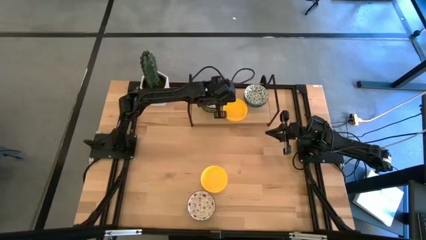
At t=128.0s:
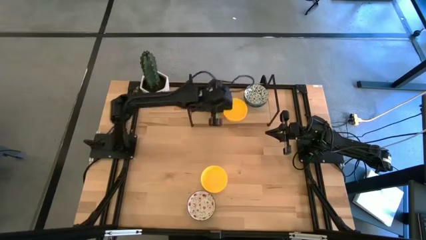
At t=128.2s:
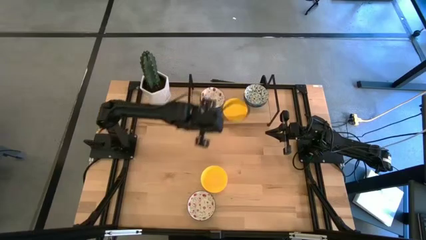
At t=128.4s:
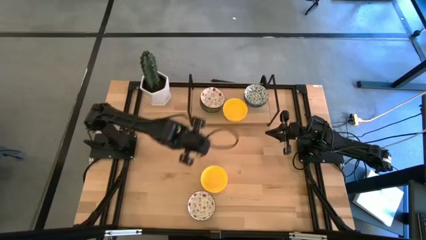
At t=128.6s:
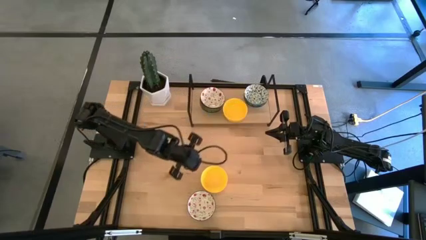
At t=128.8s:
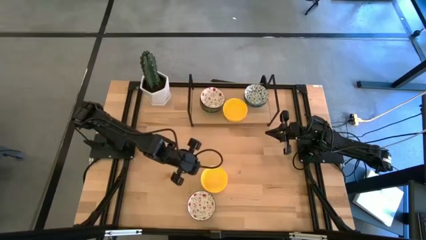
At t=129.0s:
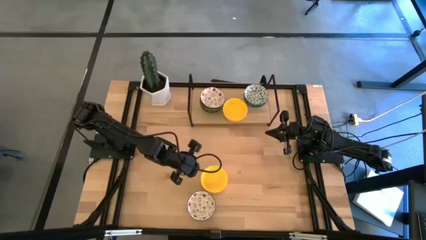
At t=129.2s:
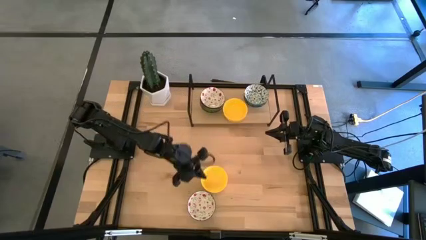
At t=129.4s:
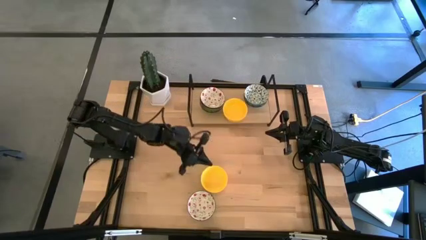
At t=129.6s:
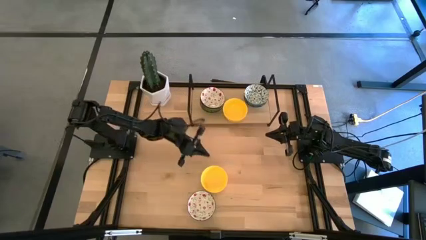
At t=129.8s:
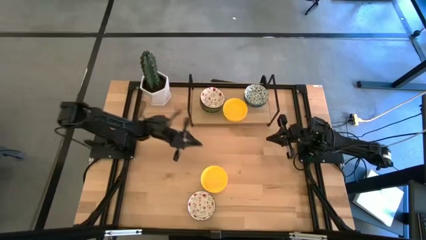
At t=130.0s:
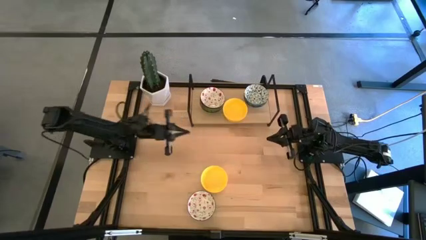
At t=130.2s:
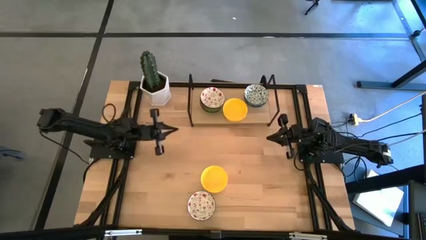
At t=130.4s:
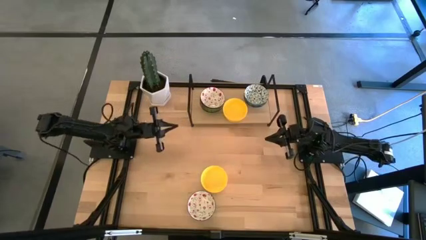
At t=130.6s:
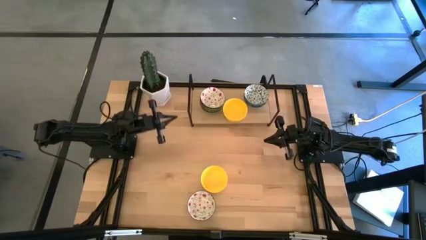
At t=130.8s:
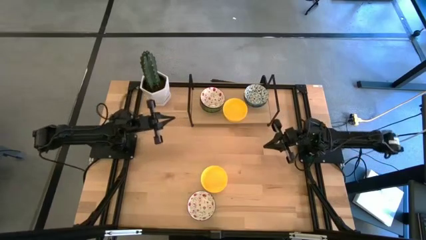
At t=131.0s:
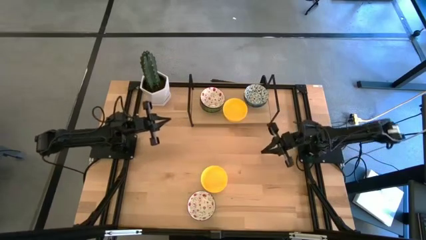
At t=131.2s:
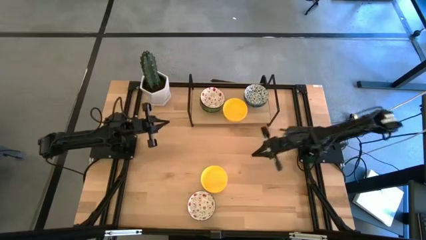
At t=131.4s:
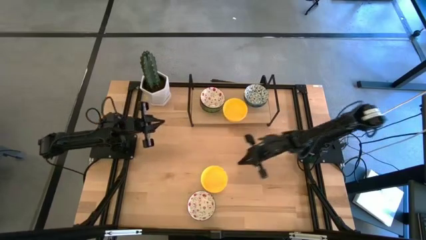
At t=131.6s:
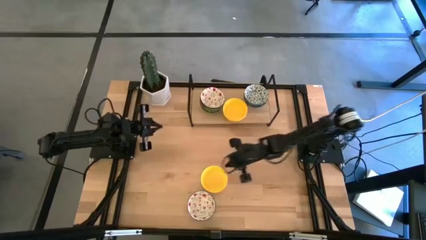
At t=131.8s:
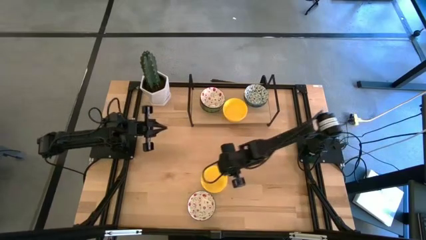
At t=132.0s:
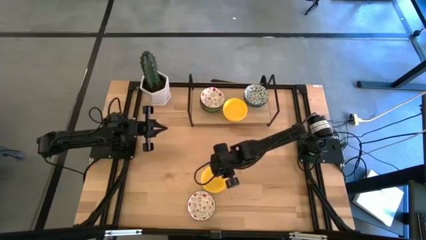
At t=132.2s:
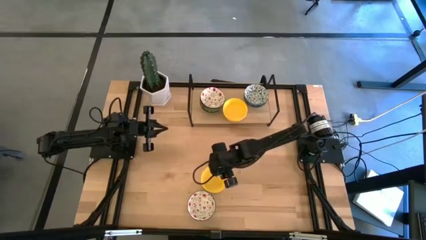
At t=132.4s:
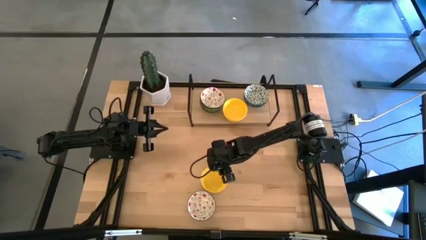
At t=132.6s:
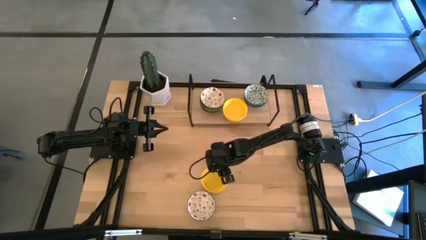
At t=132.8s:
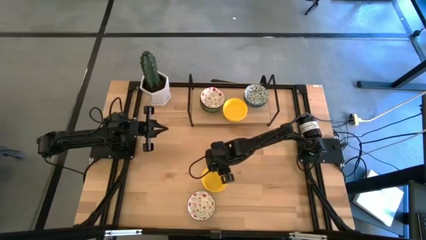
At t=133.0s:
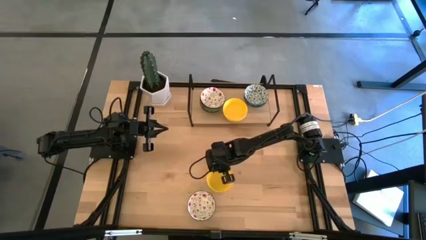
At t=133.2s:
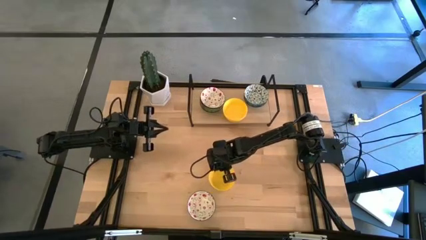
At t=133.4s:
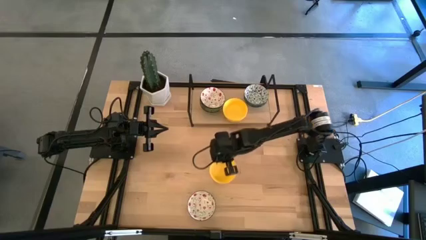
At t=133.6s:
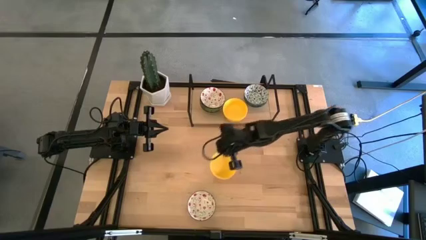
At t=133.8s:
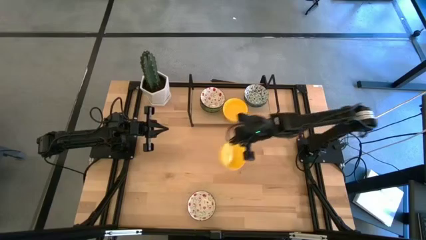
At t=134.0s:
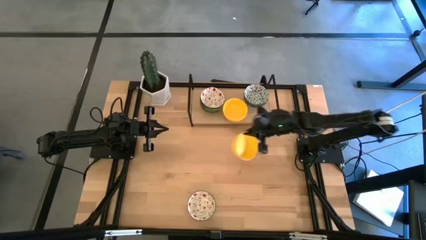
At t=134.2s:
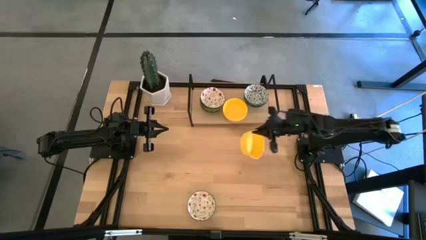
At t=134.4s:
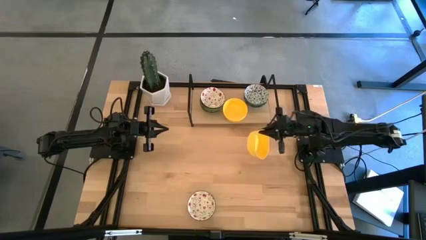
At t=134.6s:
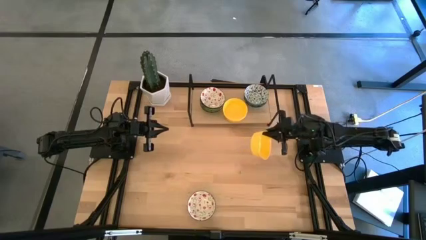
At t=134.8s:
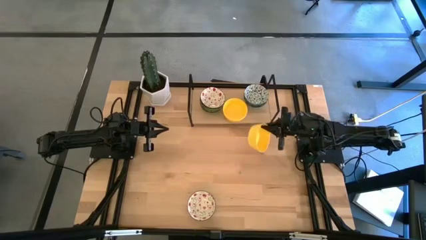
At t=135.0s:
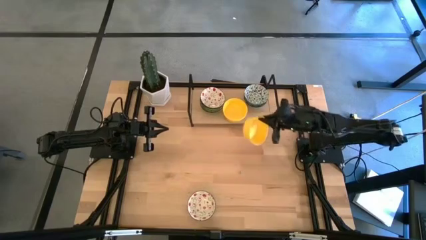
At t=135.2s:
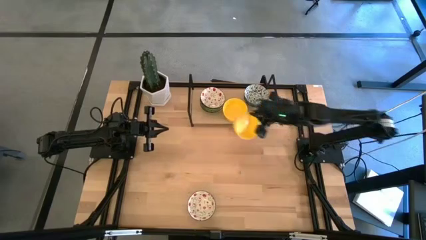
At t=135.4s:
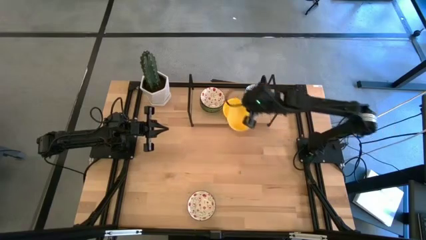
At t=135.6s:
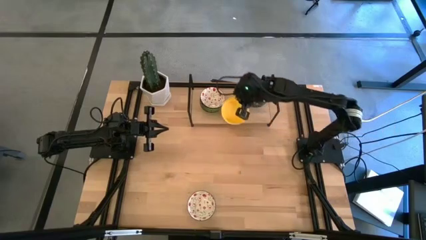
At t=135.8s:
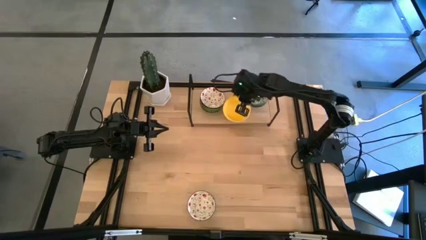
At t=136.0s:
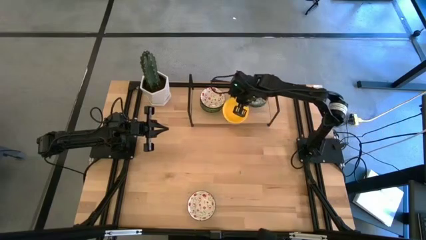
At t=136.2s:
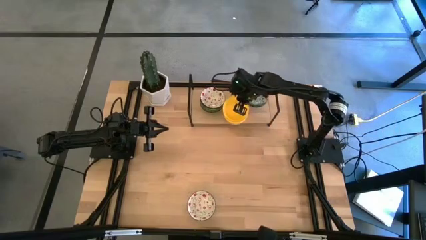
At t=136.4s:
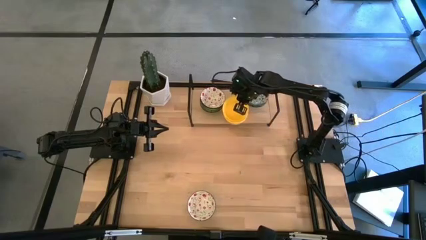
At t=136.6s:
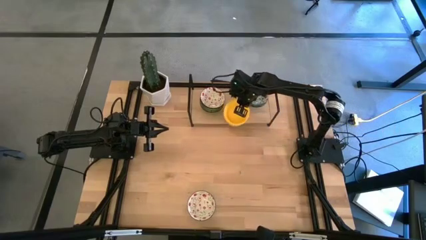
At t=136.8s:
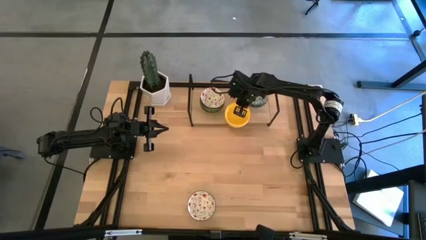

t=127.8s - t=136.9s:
Task: Pick & Place Mini bowls
Stack the yellow bowl on top of the yellow bowl on the shelf
